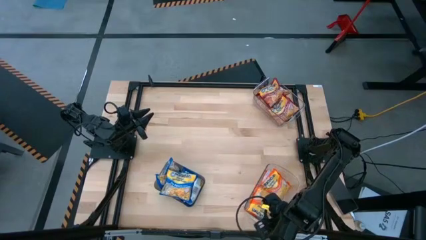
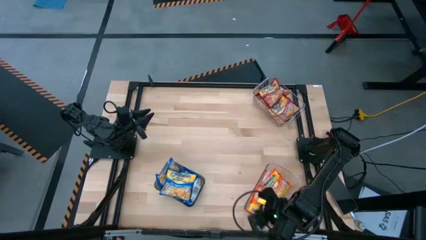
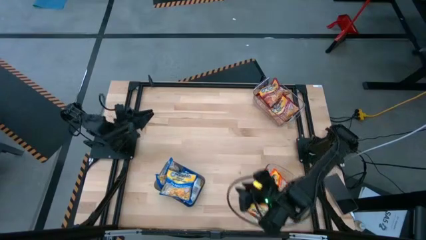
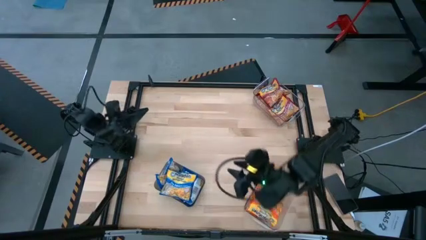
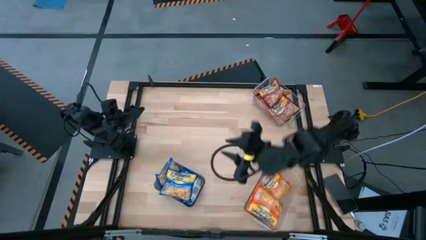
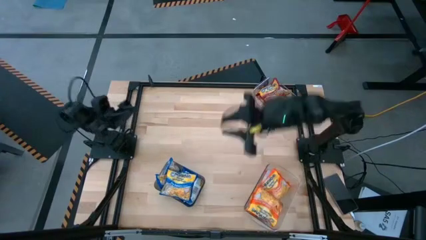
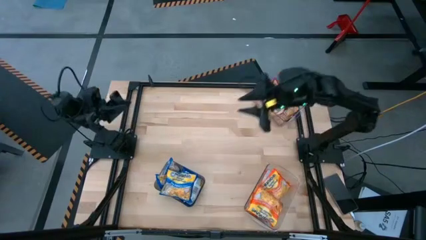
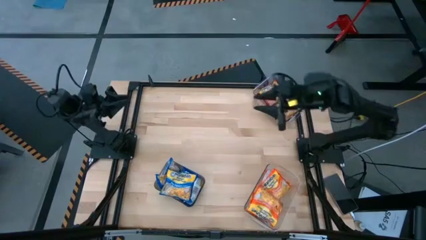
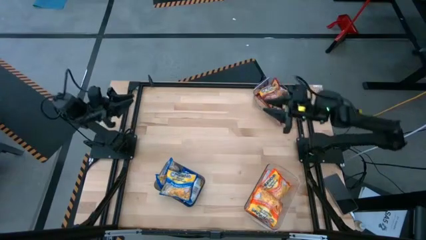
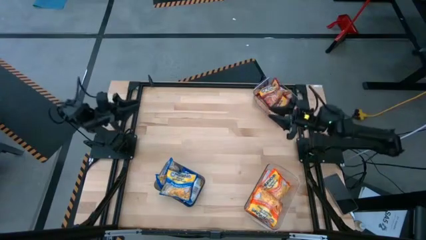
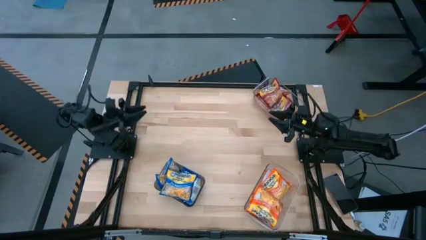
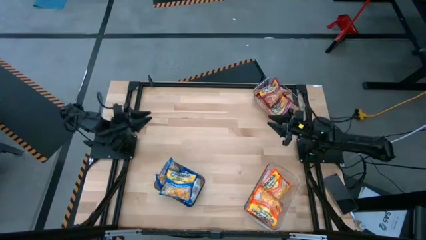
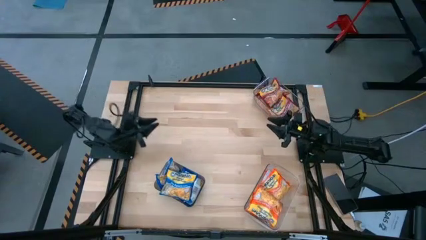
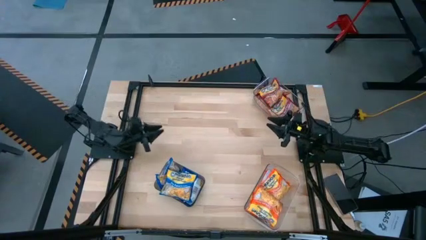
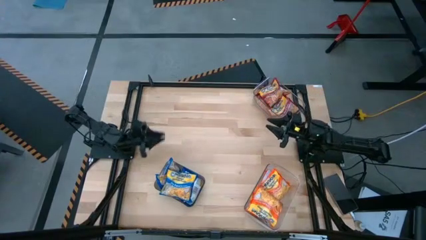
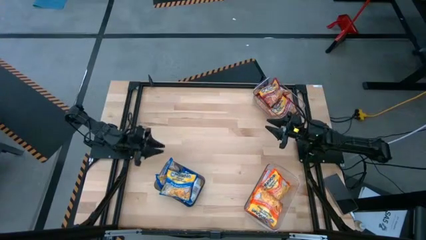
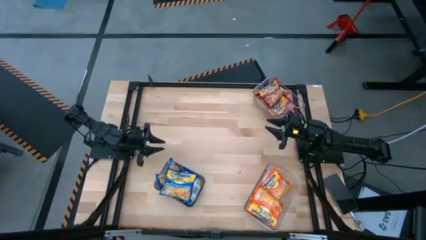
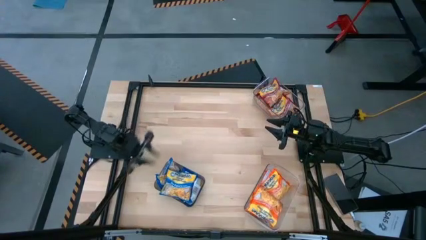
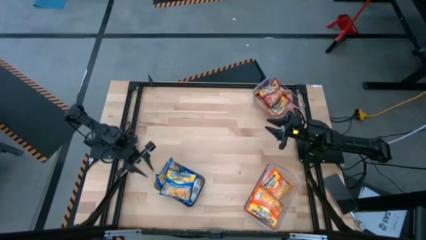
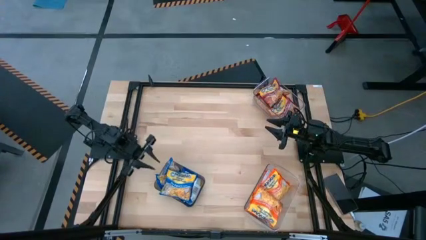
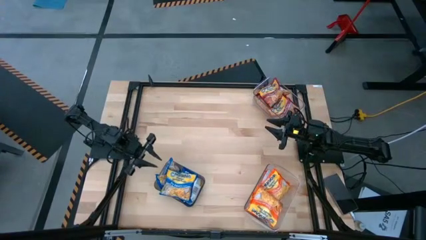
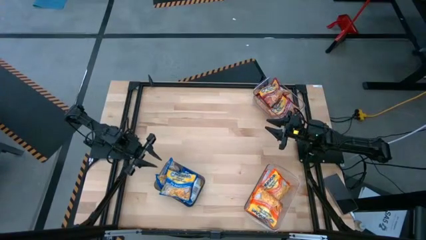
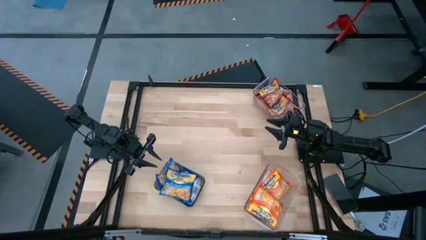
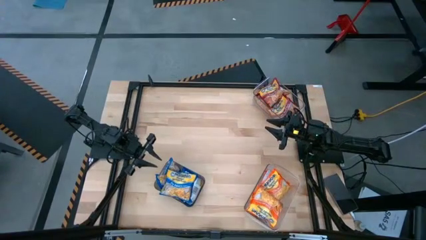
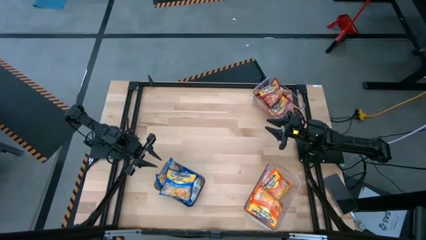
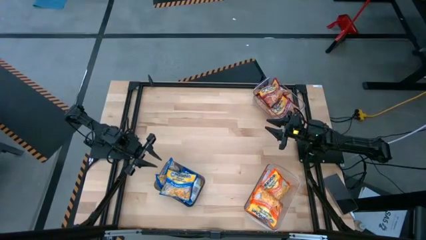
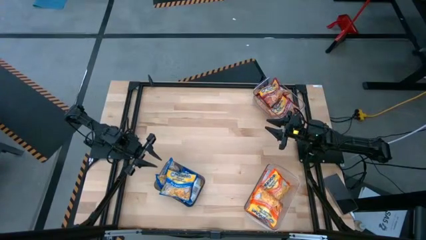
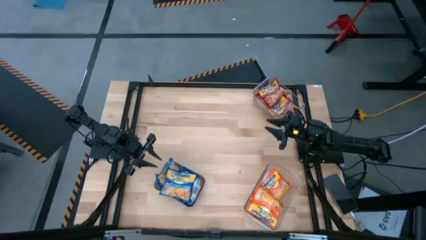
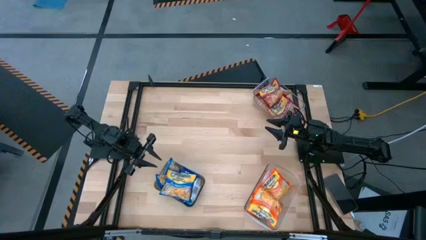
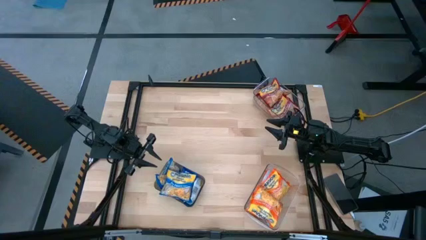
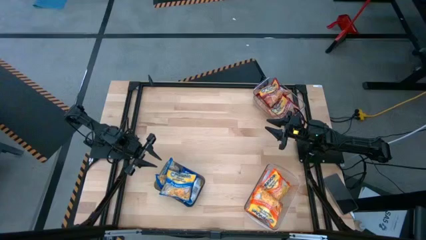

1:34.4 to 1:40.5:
Task: Sort Maruchan noodles
Return to Home Position

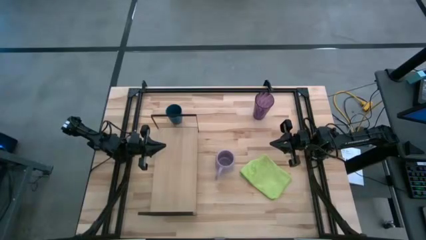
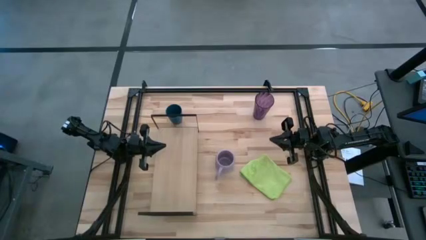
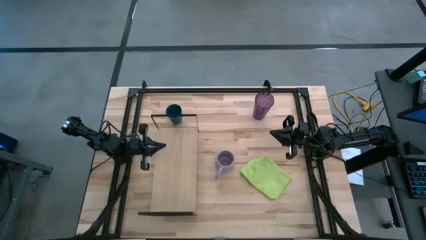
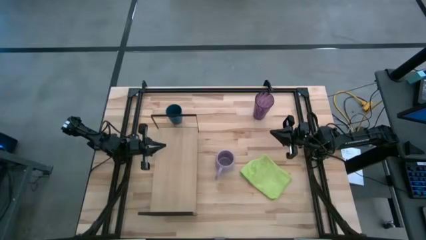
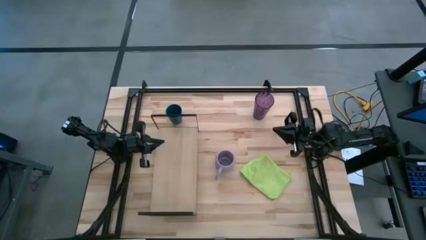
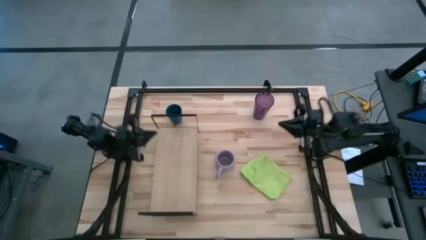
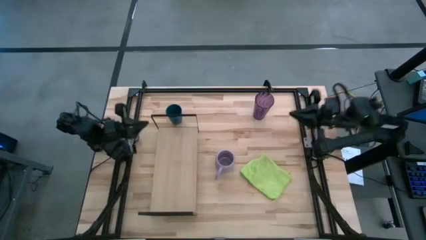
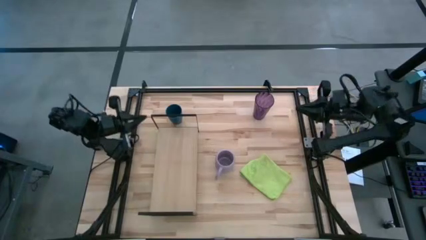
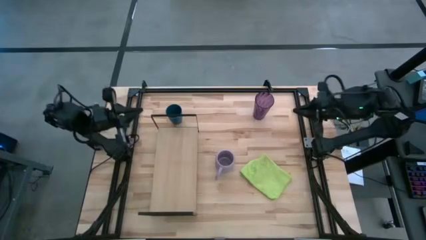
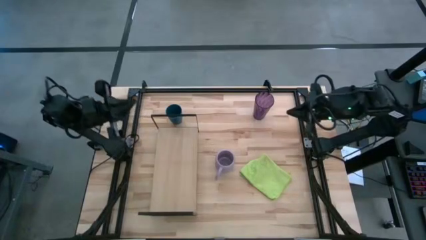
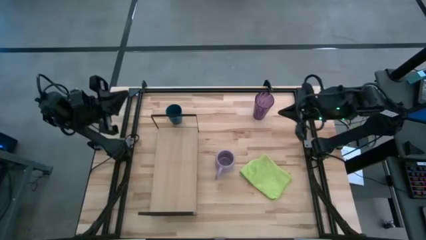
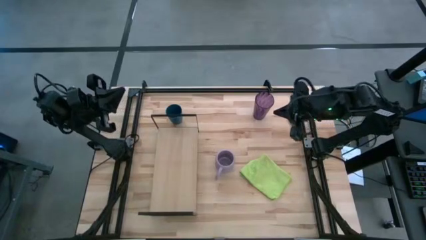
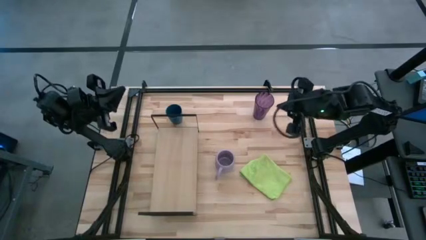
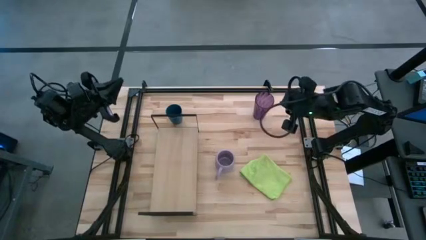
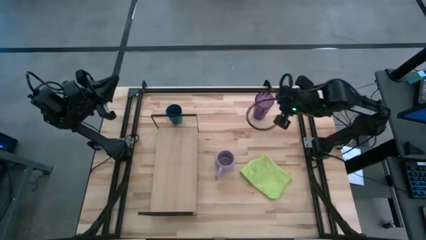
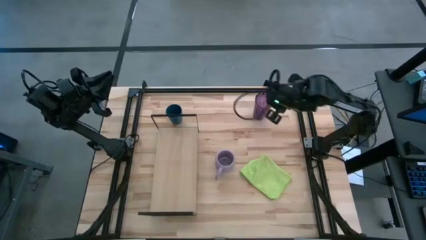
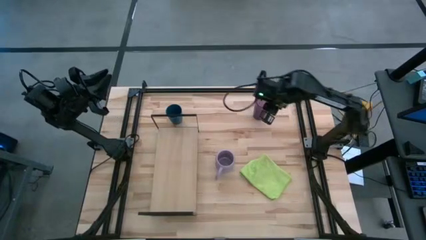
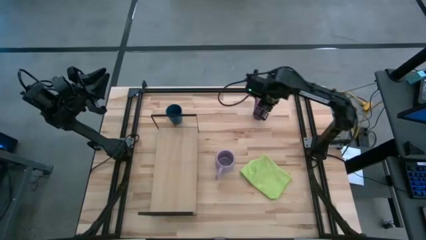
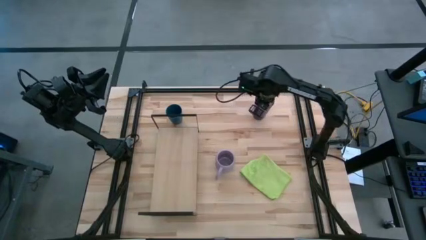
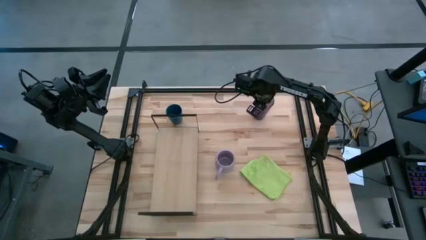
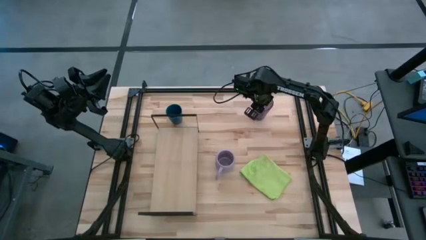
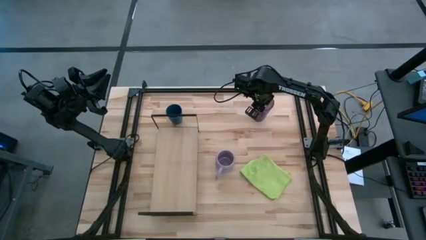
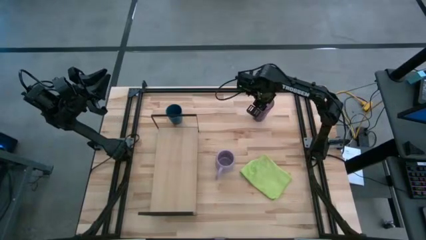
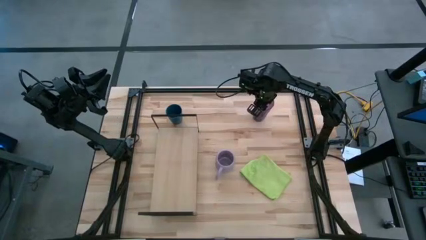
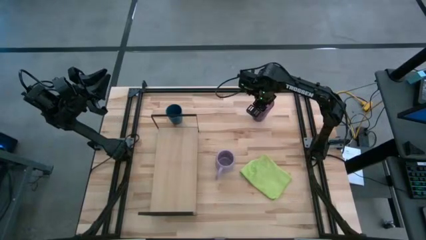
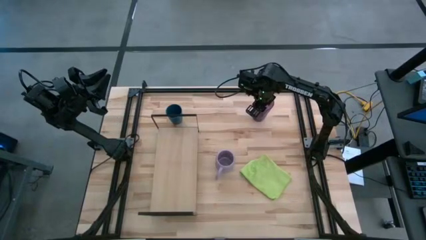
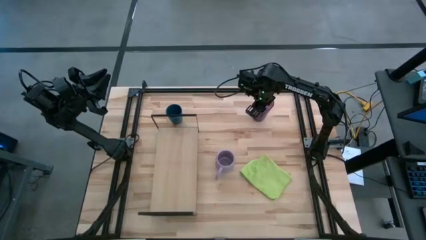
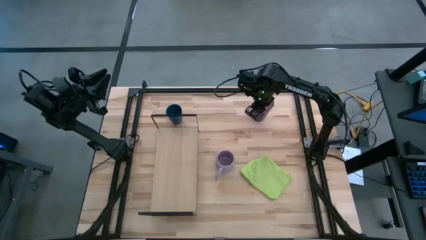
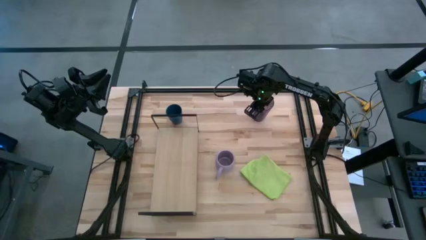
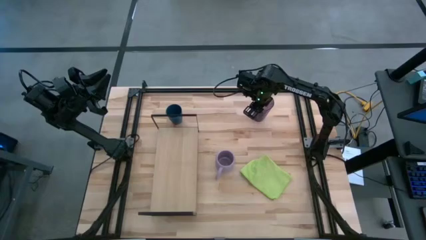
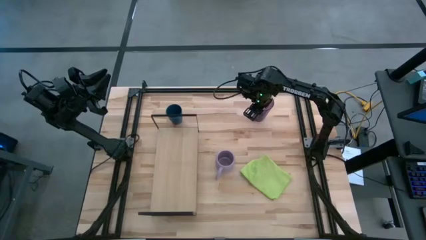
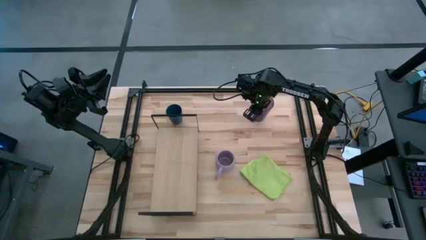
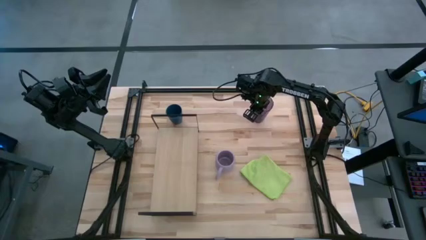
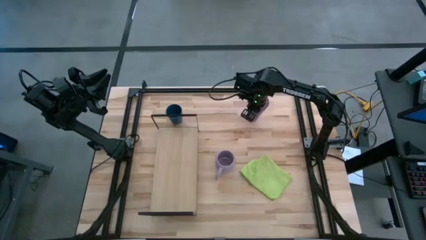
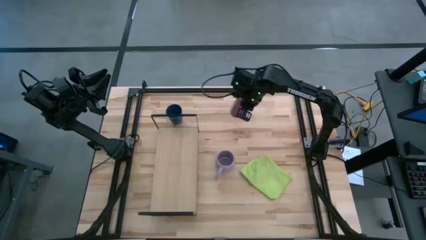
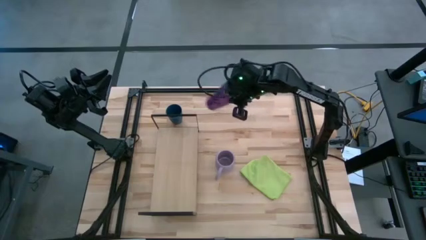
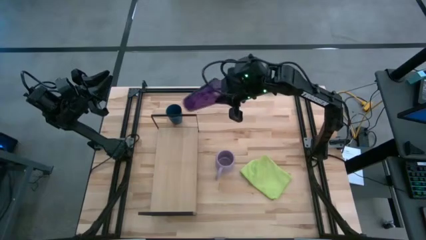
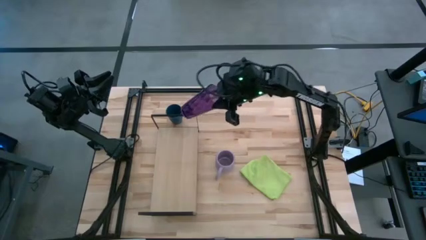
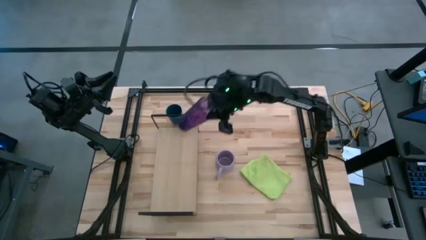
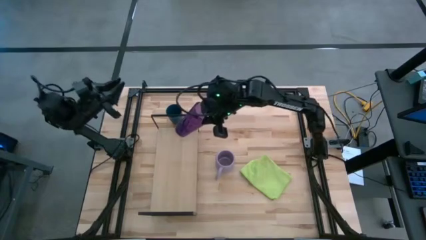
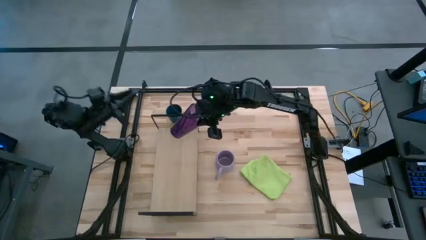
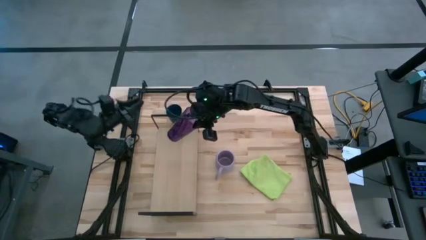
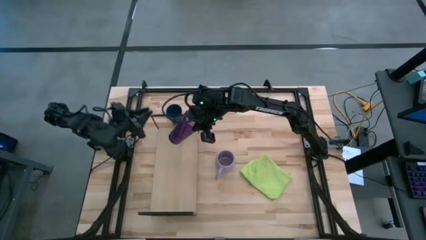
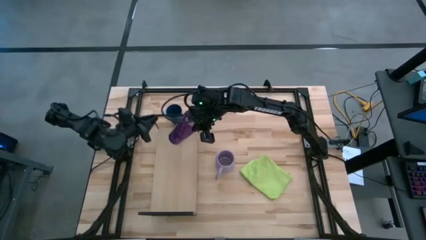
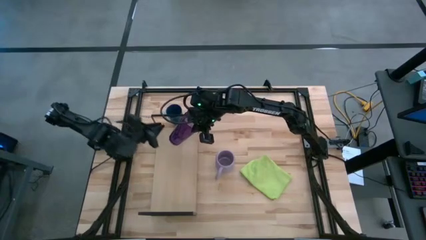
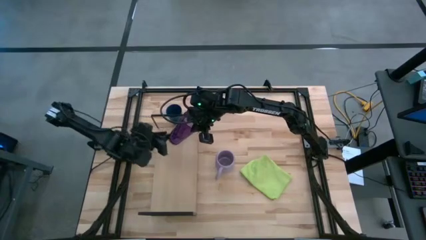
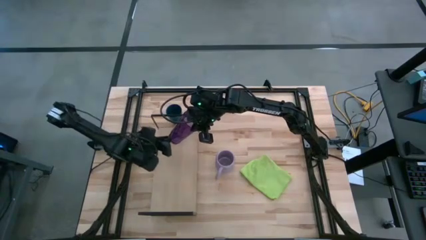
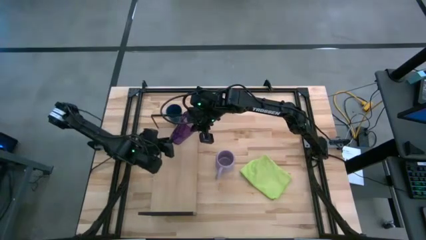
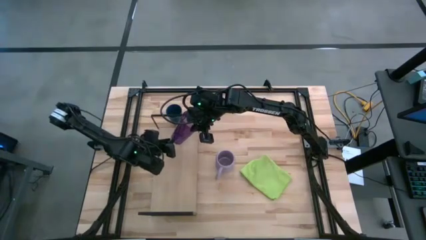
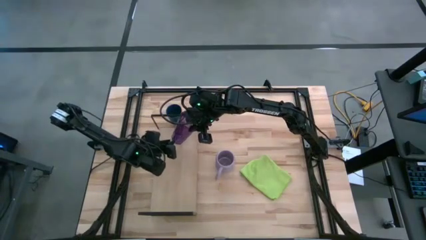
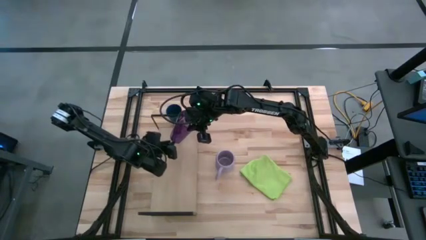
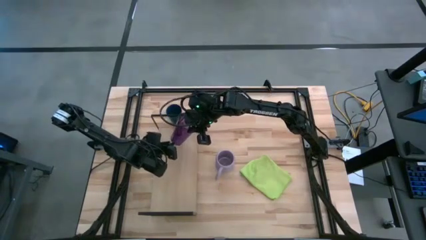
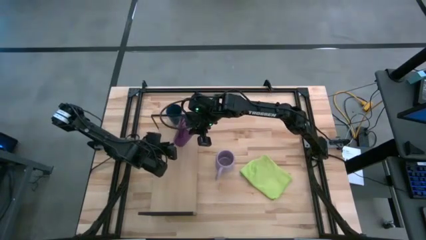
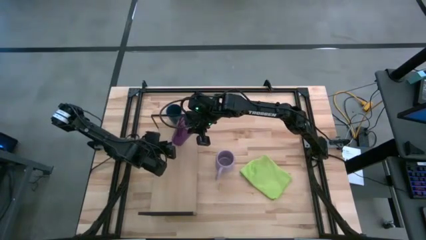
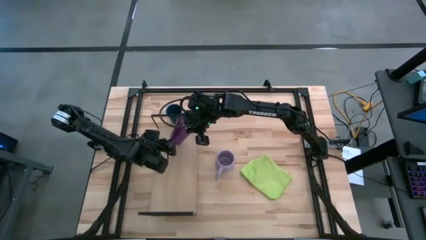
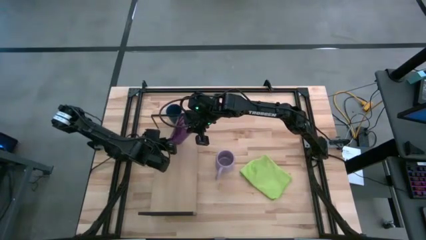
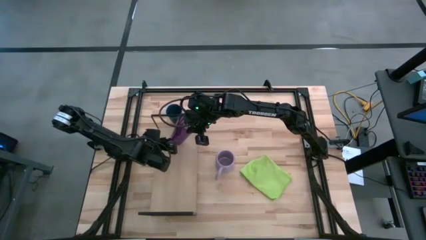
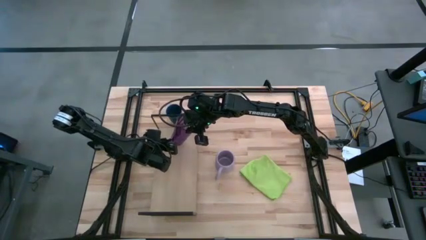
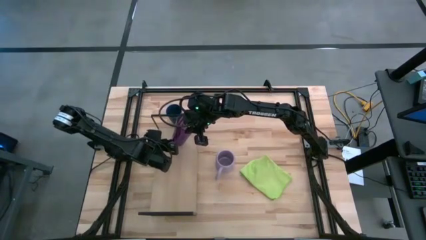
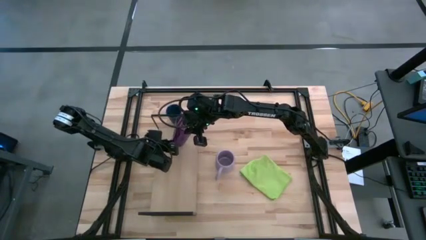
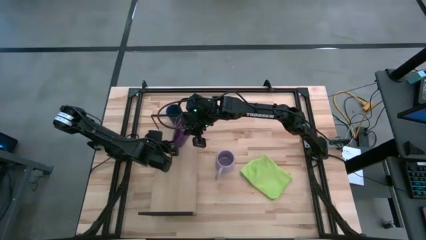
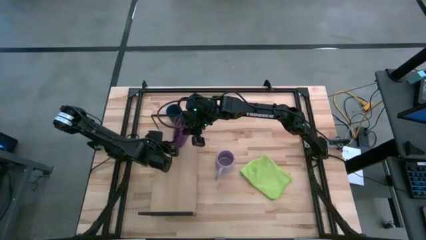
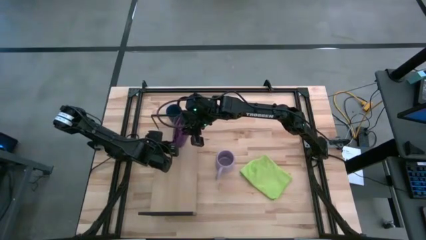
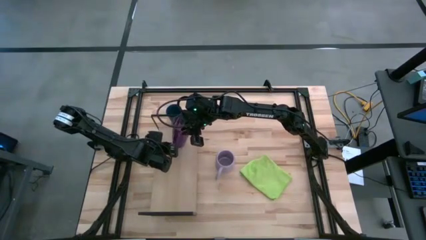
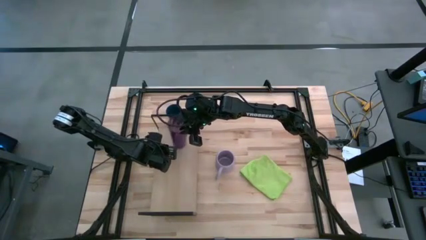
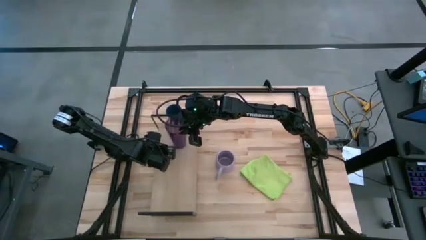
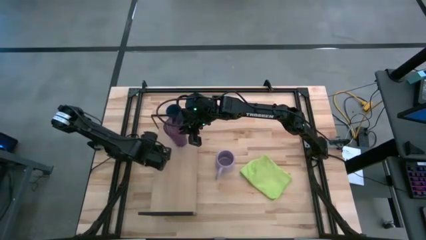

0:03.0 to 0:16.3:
Task: Stack small to large cups/mugs on shelf
Put violet cup on the shelf
